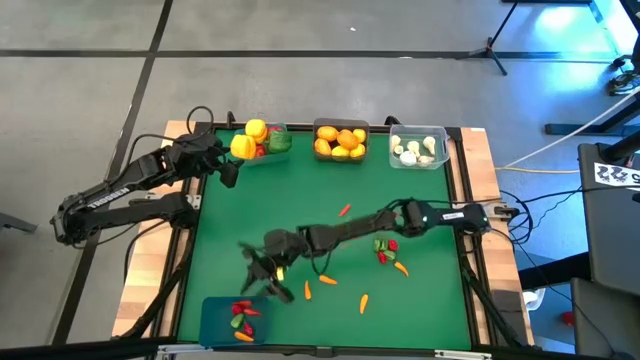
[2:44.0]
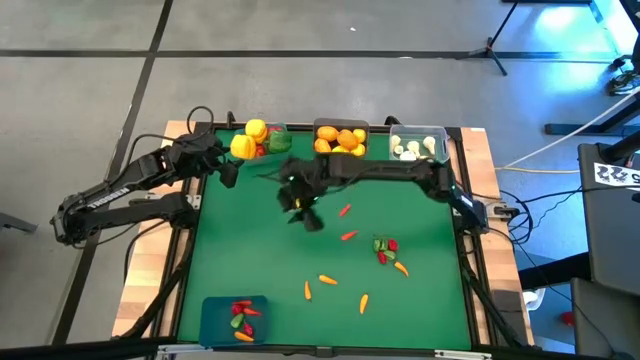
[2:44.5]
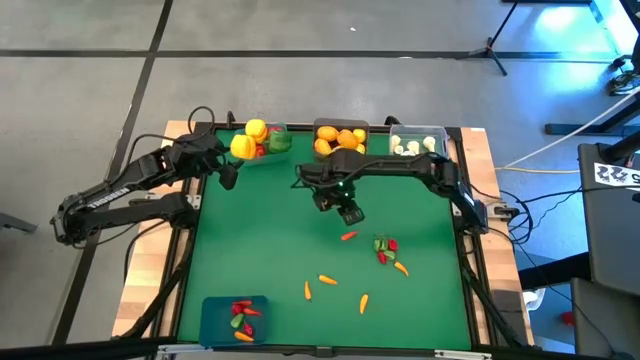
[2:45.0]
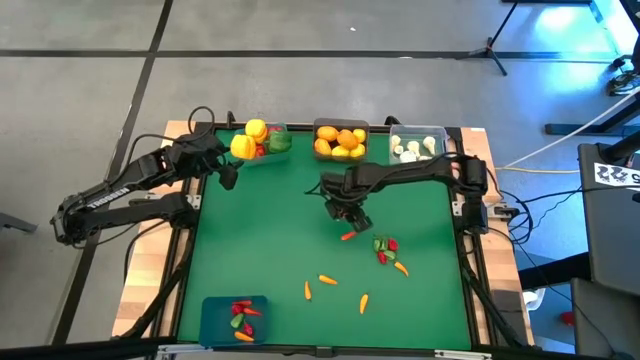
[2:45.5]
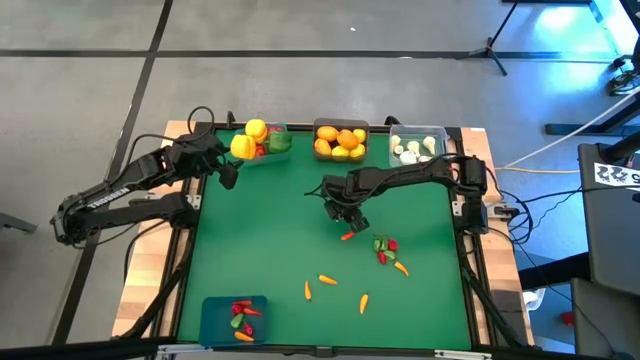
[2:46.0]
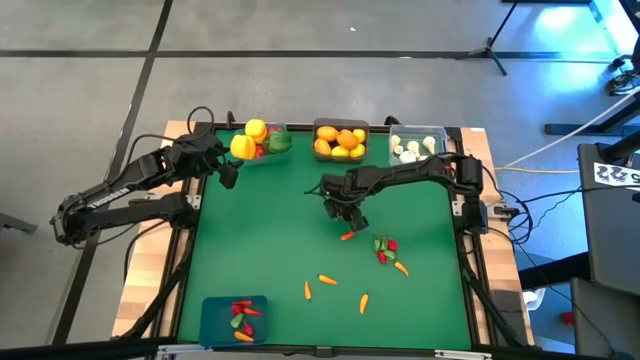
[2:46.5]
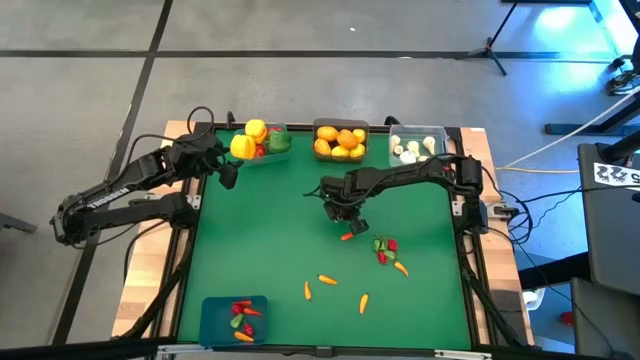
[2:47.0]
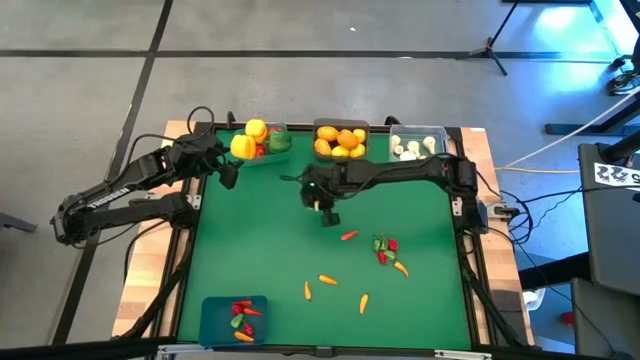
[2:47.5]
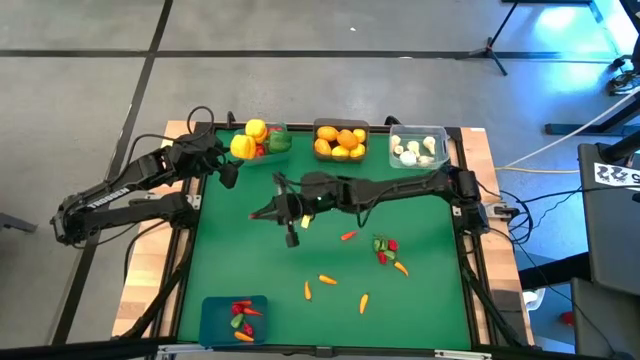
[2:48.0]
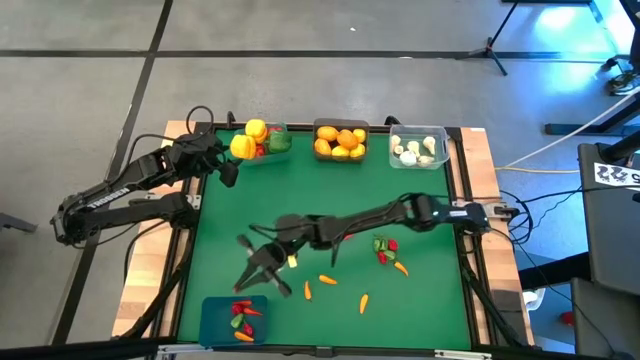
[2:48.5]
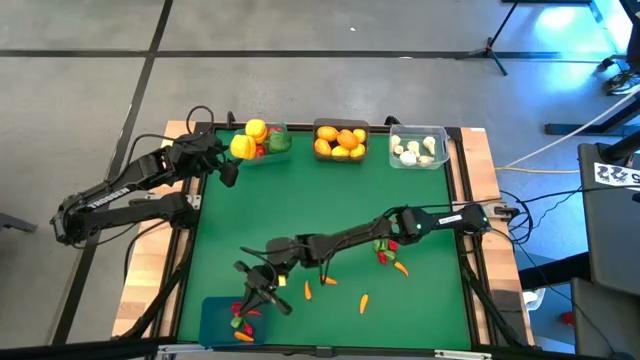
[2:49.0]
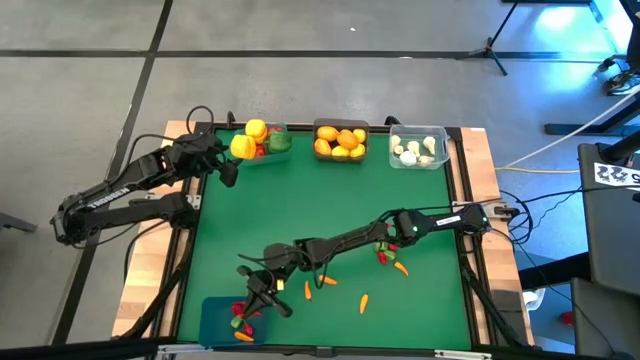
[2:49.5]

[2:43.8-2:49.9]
Task: Sort produce into baskets
Put the orange chili pepper into the dark blue bin

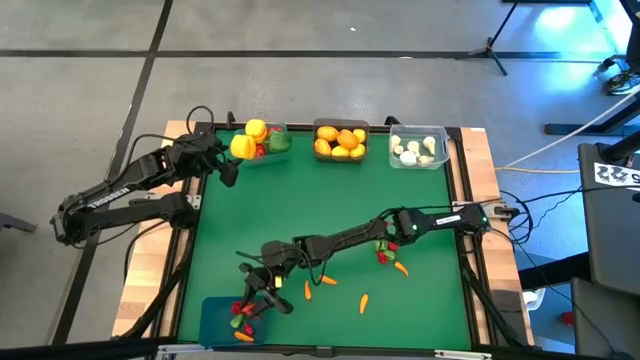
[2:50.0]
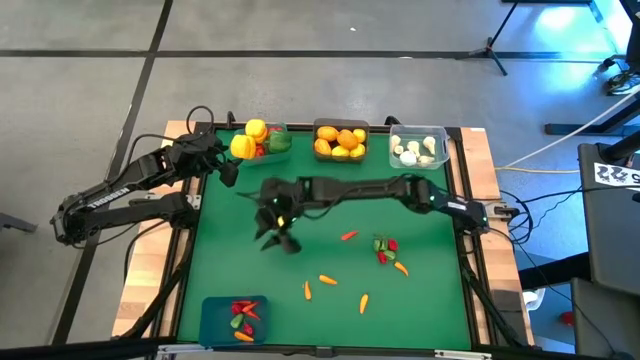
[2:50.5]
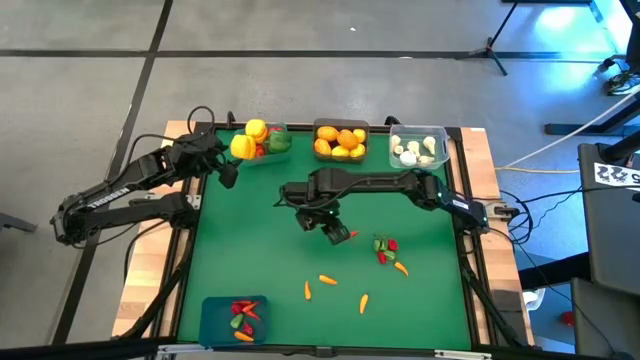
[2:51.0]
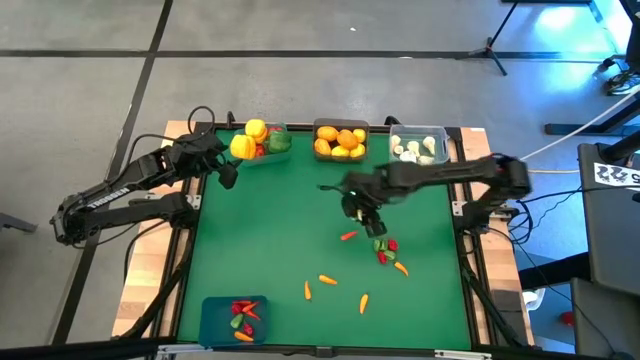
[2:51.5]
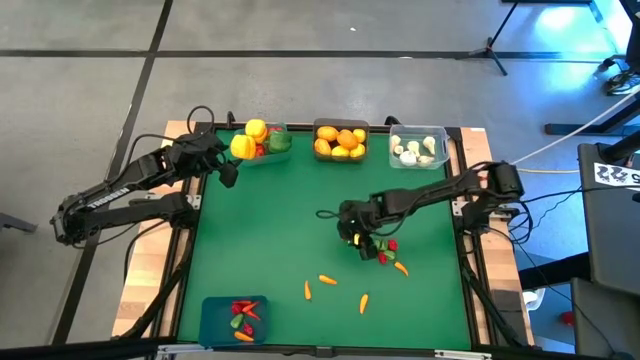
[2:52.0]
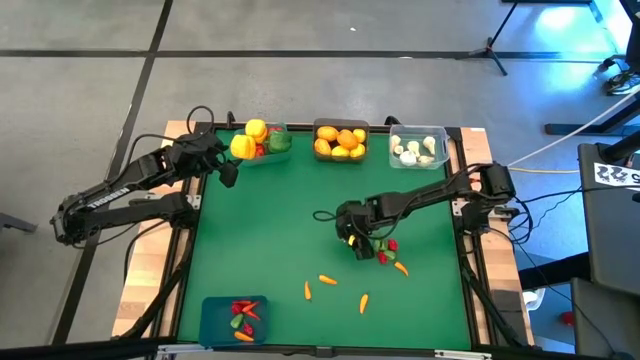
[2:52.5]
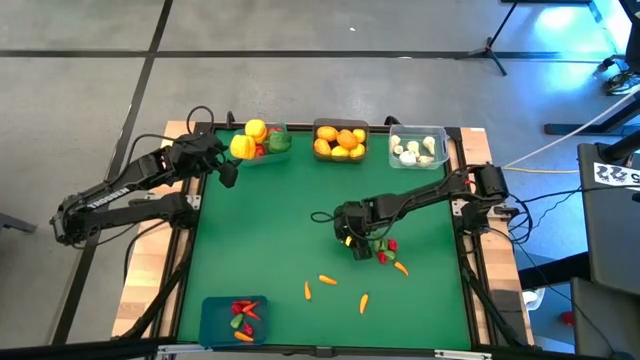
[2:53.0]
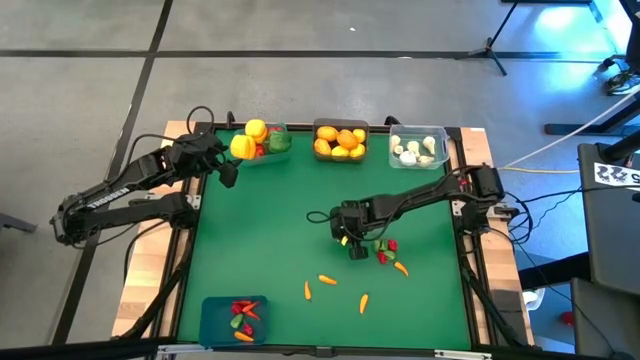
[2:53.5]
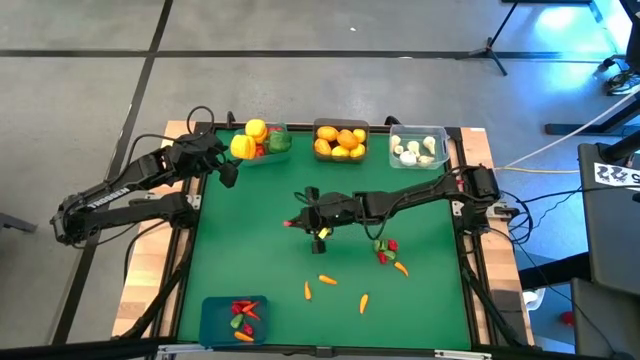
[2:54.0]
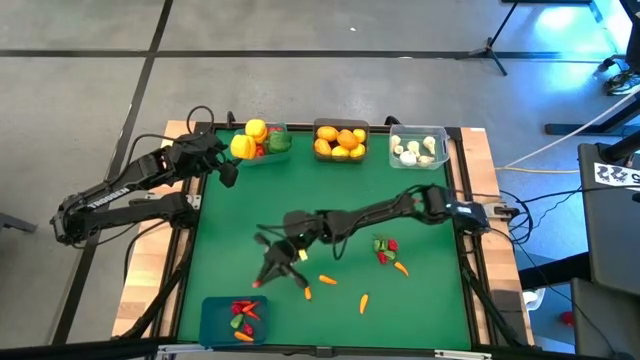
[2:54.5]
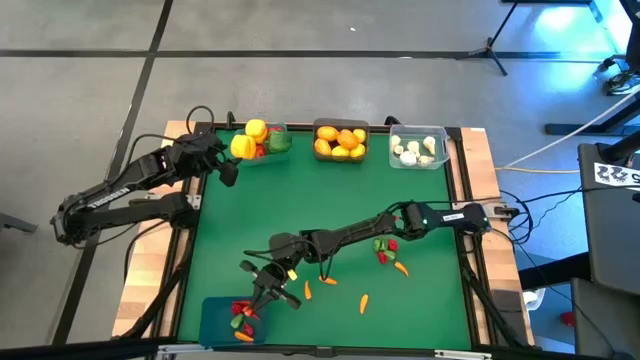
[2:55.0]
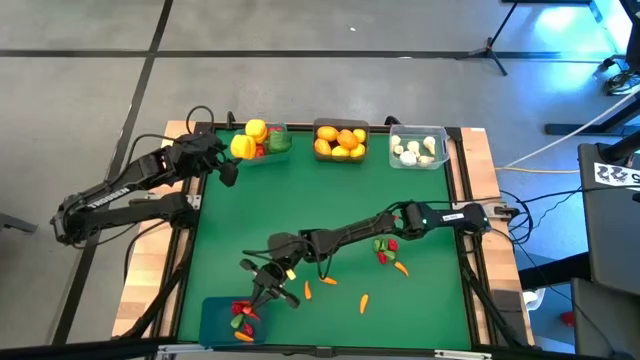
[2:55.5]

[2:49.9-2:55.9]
Put the orange chili into the dark blue bin

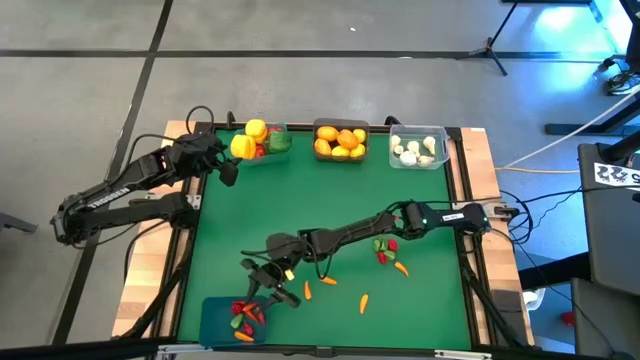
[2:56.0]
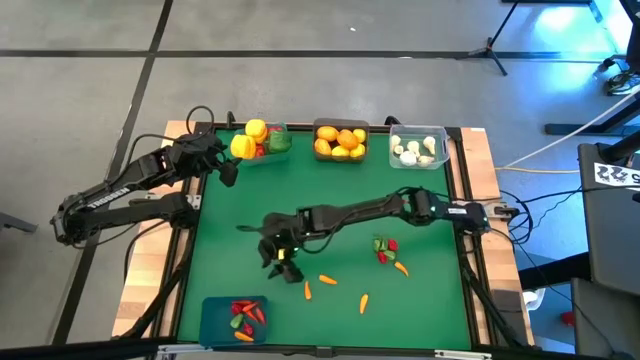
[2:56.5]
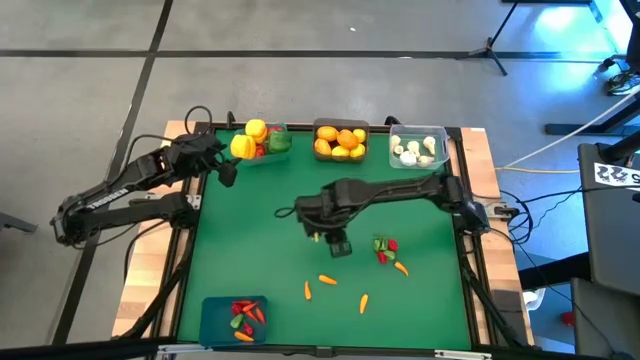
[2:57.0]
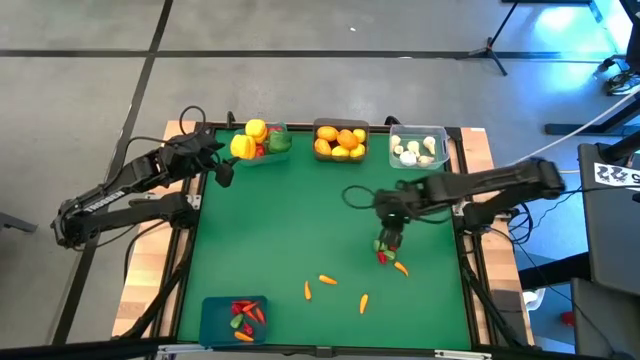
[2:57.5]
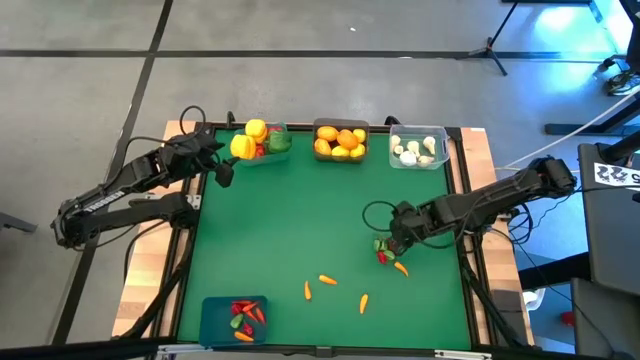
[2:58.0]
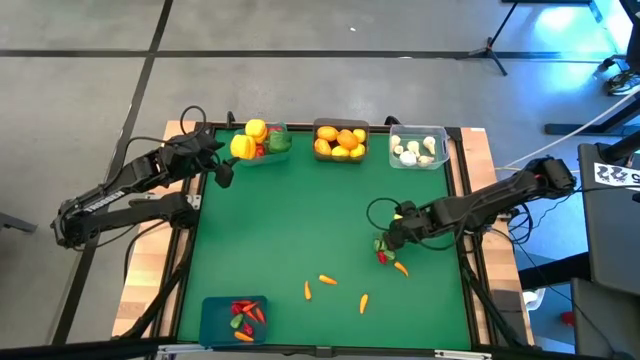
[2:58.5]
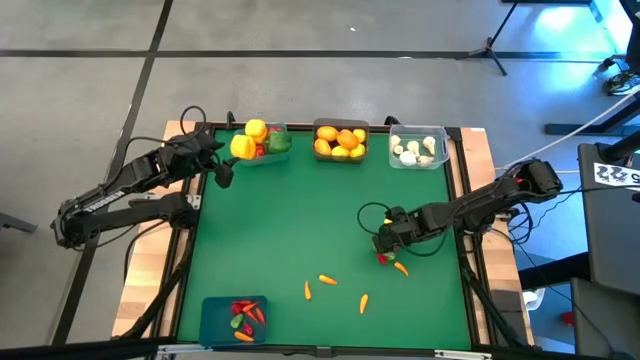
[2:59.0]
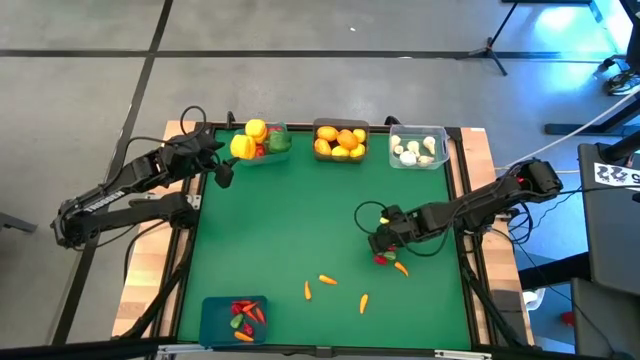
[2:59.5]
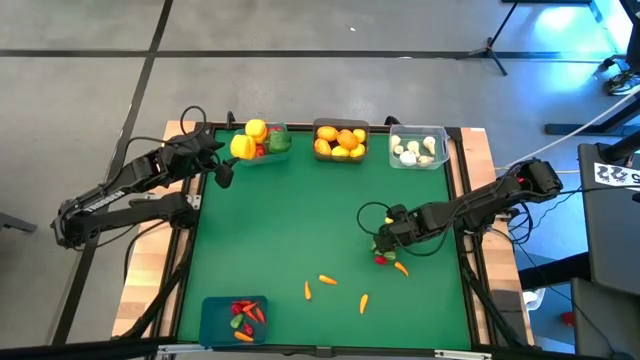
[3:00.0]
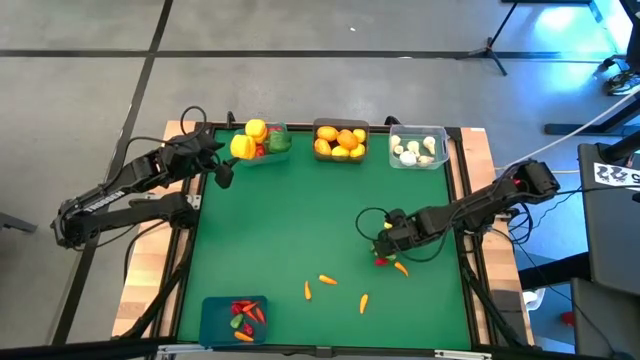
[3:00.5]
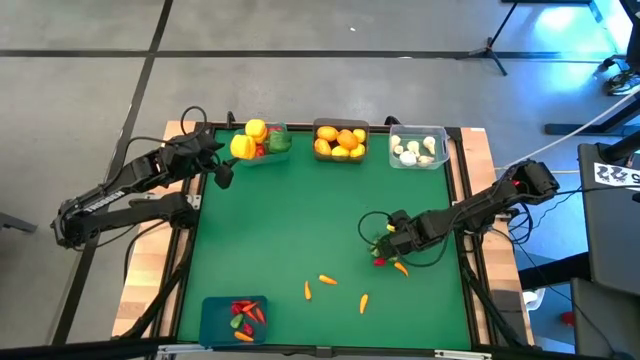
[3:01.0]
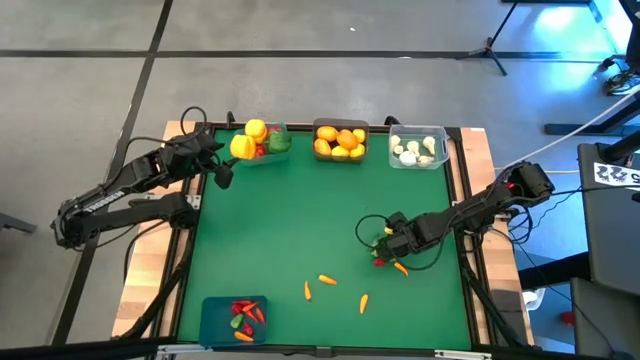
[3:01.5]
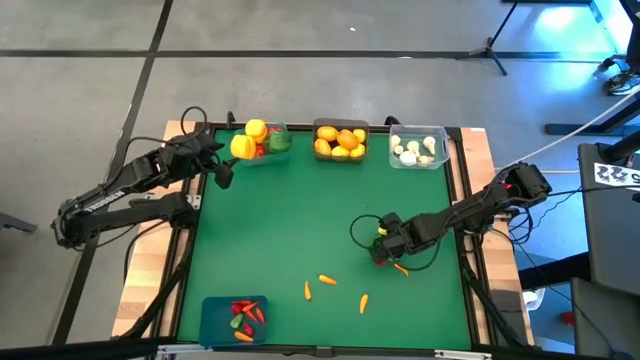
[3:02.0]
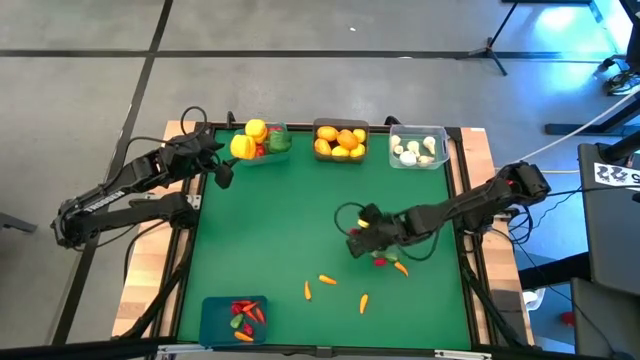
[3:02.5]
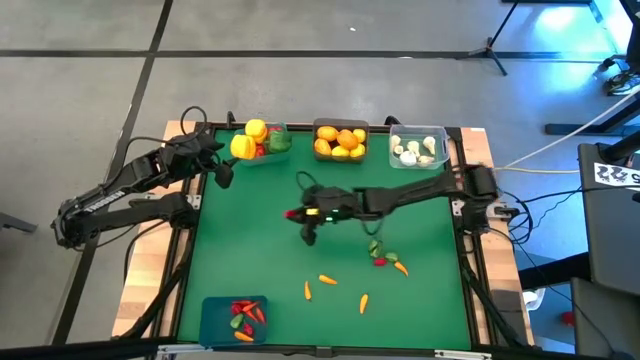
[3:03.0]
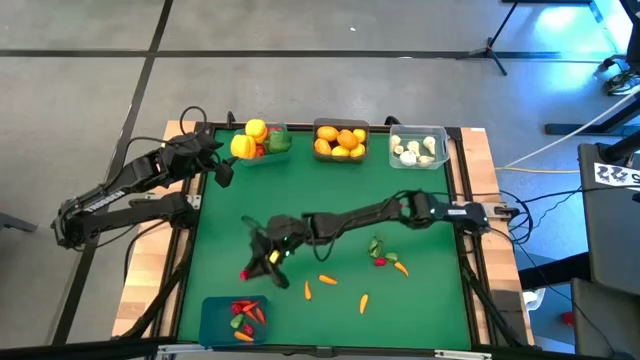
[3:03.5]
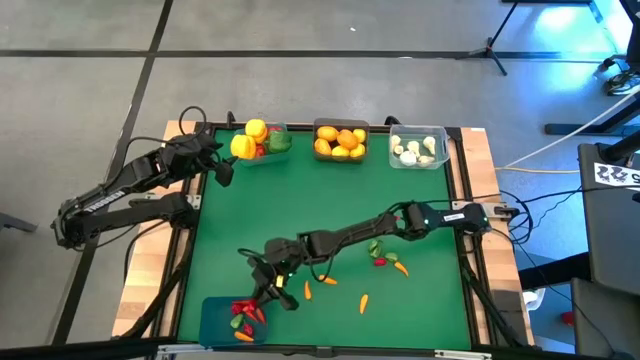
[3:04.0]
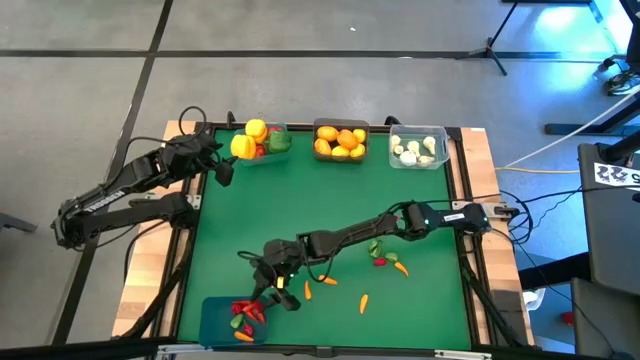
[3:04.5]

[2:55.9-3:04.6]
Put the red chili pepper into the dark blue bin
